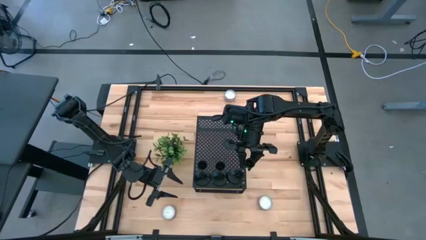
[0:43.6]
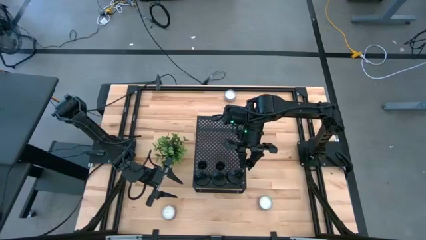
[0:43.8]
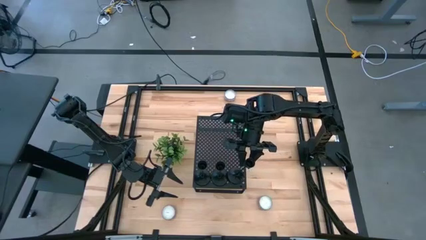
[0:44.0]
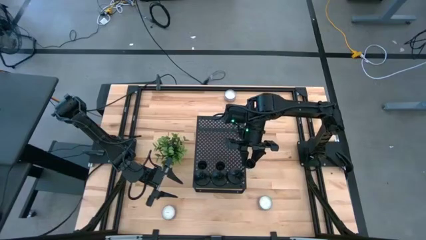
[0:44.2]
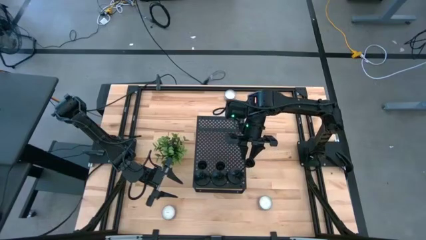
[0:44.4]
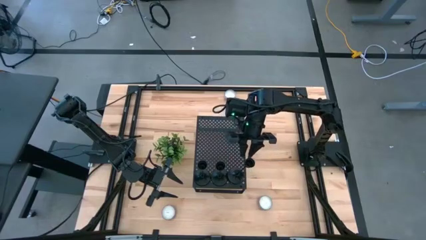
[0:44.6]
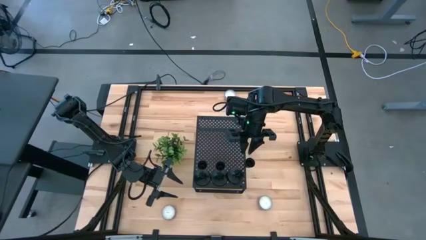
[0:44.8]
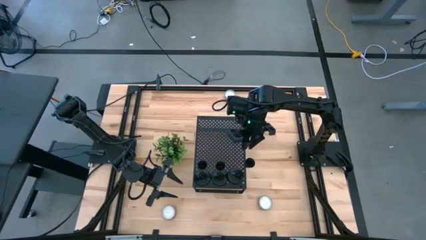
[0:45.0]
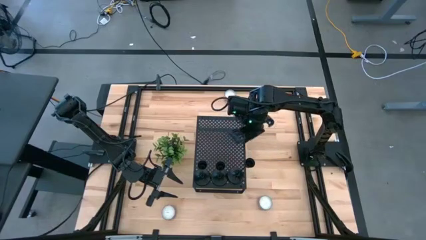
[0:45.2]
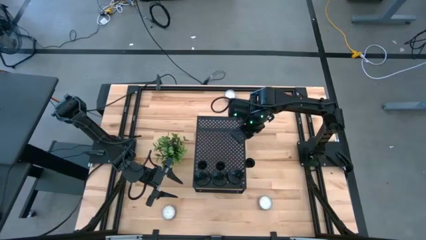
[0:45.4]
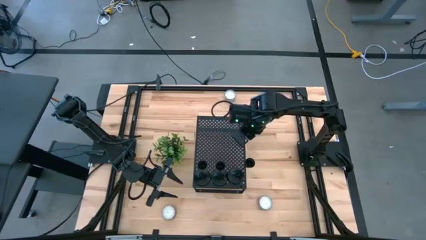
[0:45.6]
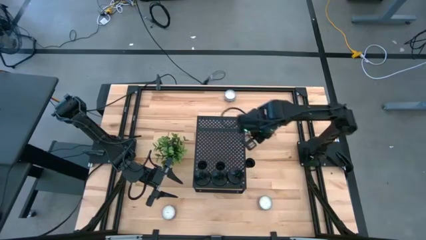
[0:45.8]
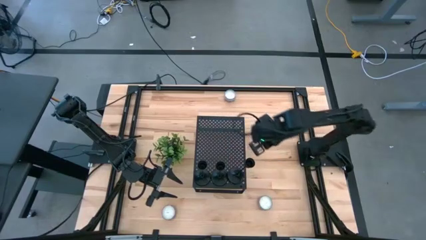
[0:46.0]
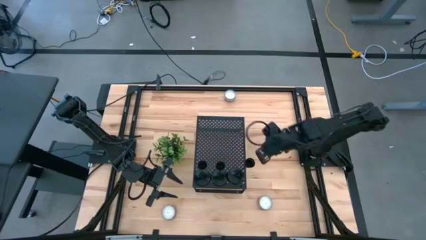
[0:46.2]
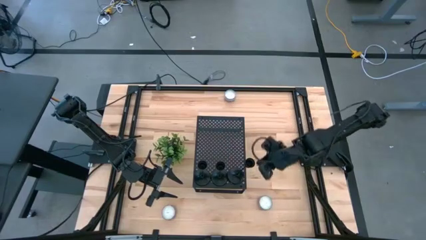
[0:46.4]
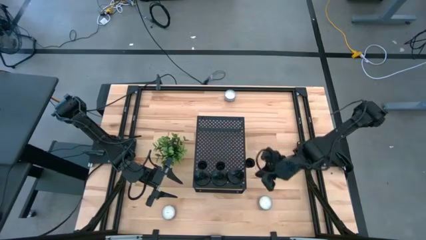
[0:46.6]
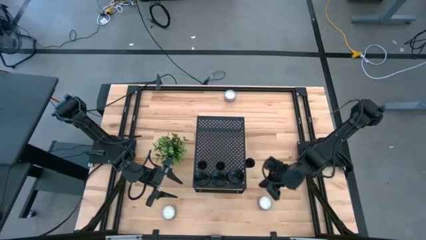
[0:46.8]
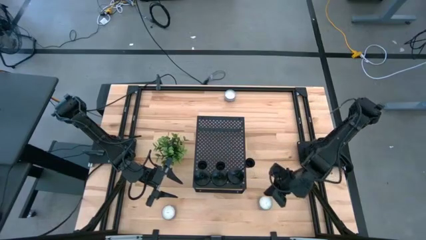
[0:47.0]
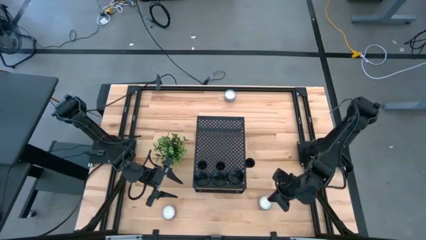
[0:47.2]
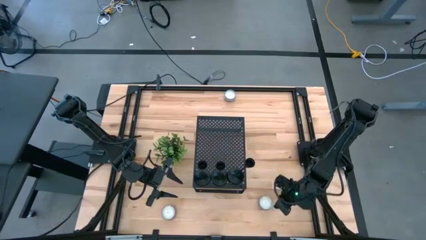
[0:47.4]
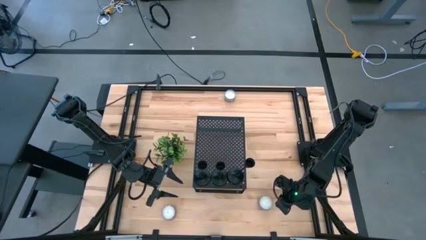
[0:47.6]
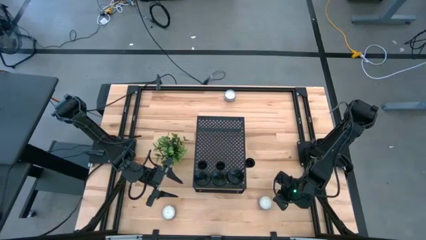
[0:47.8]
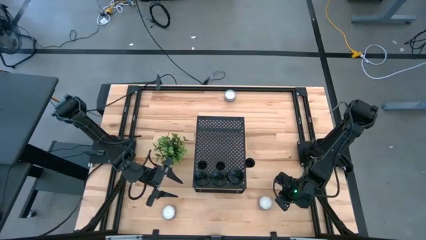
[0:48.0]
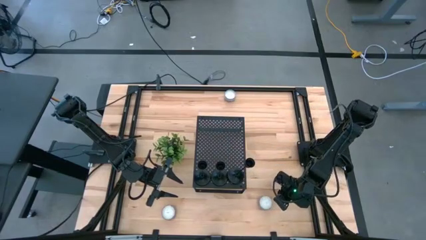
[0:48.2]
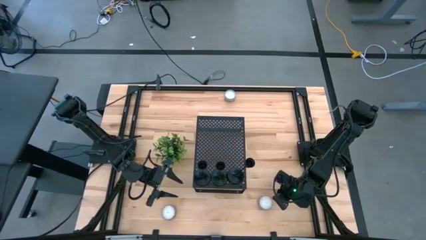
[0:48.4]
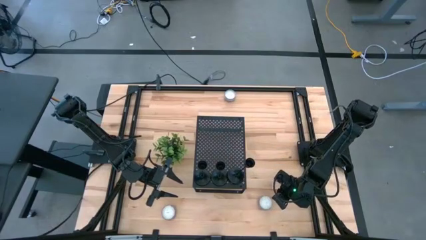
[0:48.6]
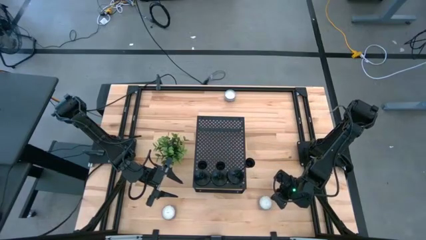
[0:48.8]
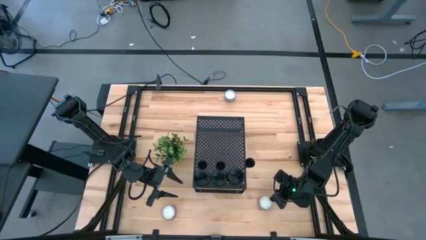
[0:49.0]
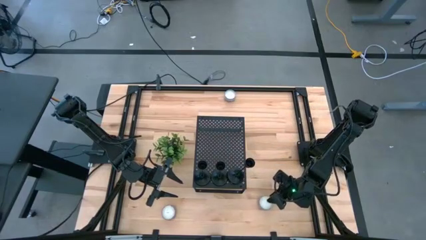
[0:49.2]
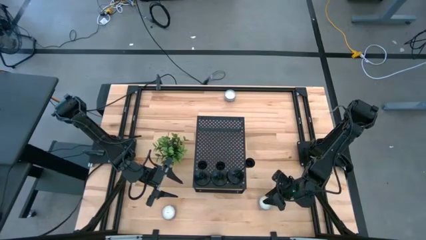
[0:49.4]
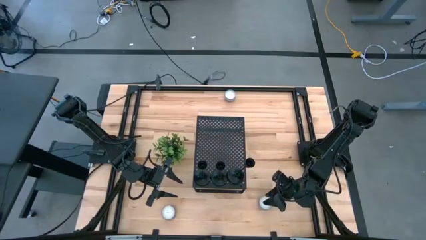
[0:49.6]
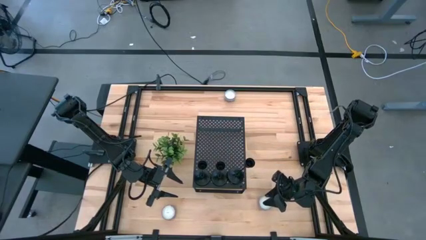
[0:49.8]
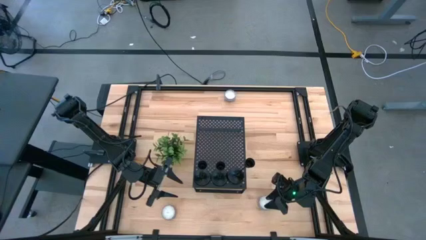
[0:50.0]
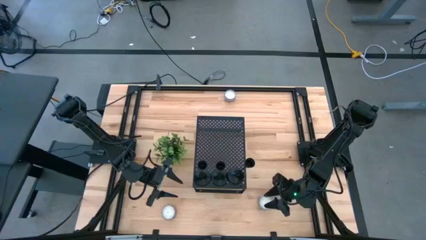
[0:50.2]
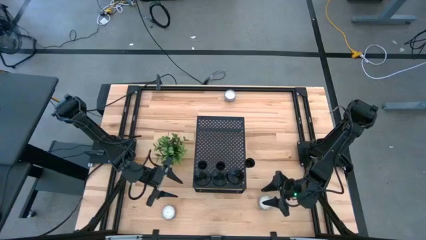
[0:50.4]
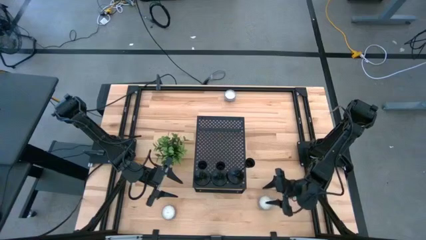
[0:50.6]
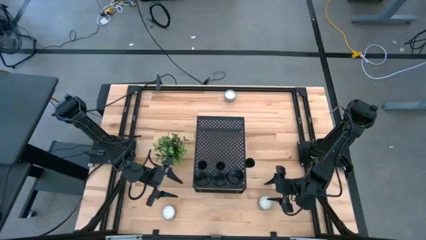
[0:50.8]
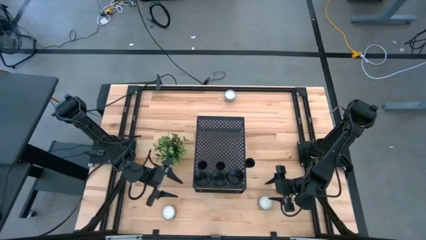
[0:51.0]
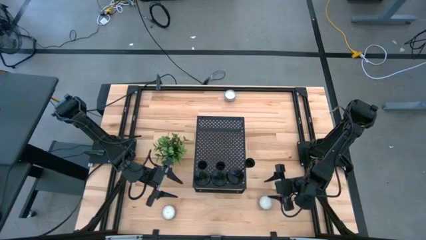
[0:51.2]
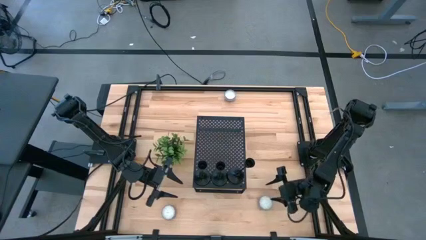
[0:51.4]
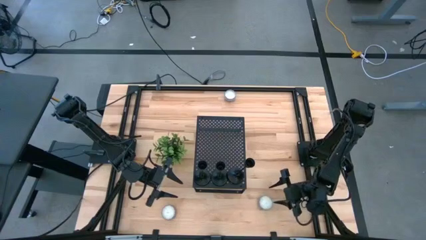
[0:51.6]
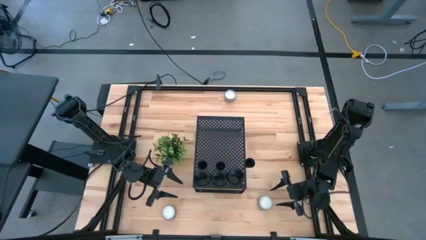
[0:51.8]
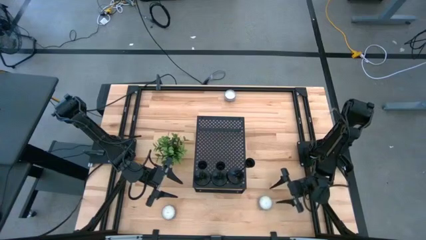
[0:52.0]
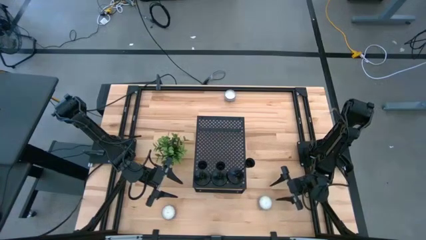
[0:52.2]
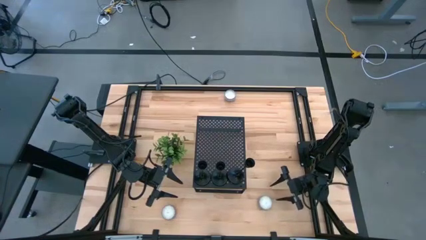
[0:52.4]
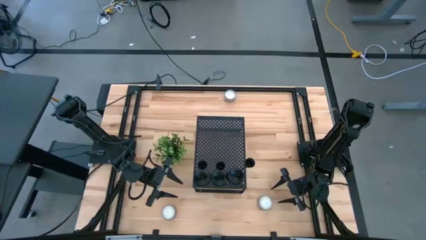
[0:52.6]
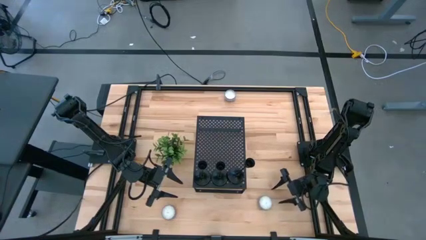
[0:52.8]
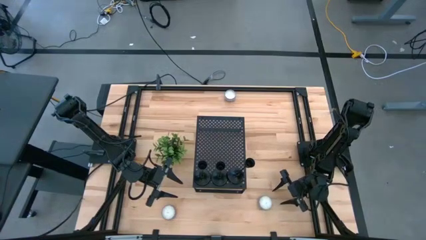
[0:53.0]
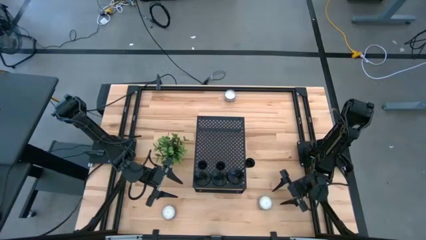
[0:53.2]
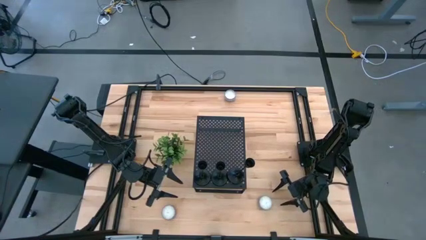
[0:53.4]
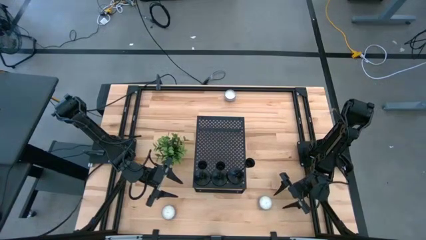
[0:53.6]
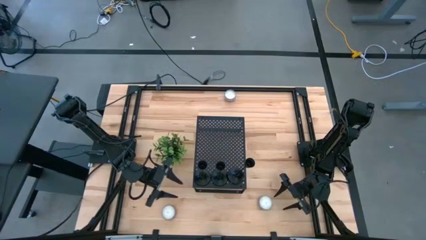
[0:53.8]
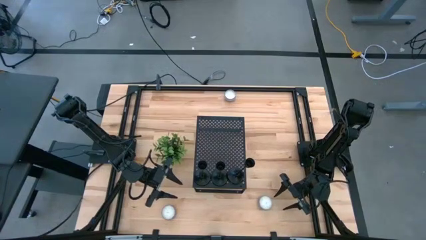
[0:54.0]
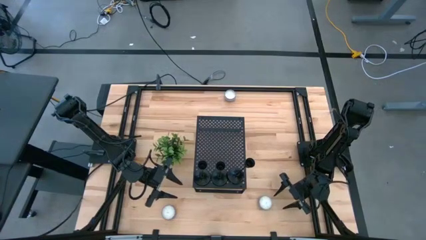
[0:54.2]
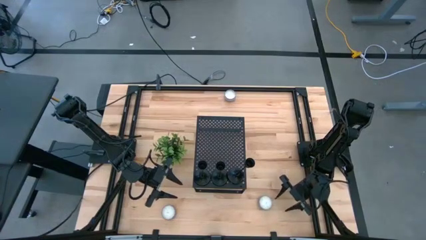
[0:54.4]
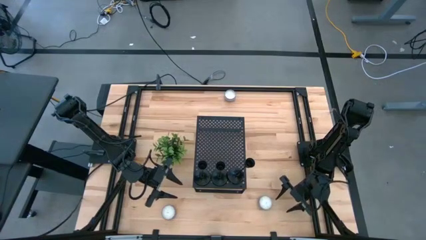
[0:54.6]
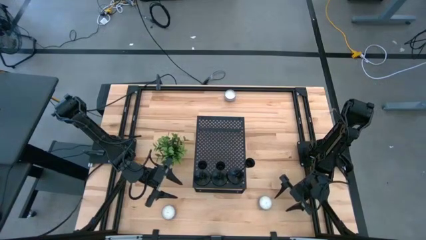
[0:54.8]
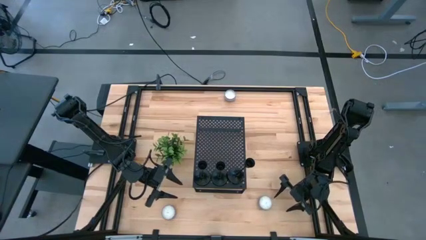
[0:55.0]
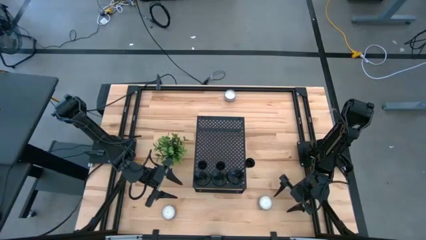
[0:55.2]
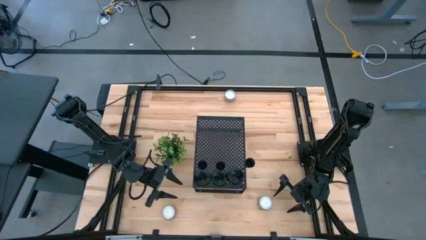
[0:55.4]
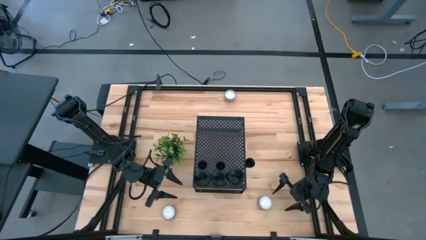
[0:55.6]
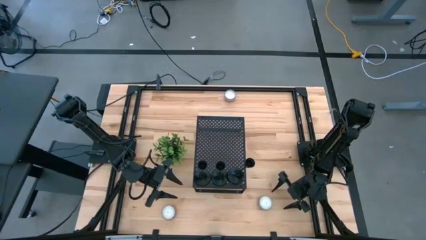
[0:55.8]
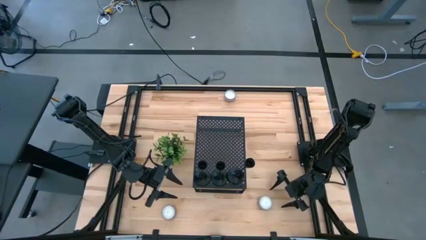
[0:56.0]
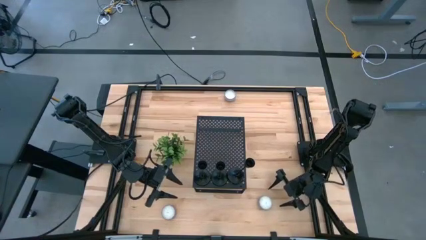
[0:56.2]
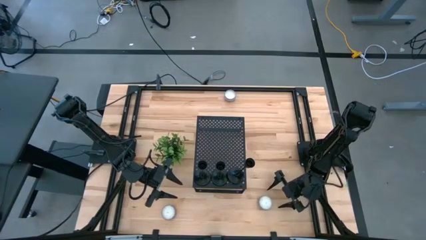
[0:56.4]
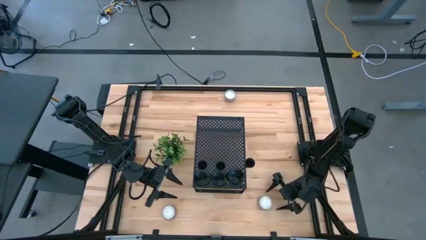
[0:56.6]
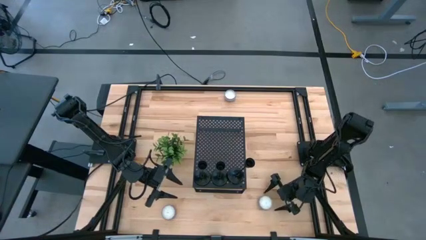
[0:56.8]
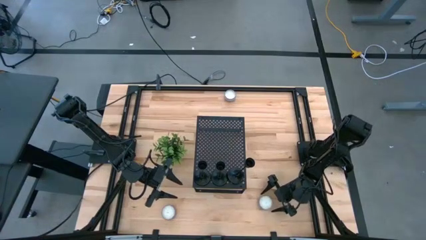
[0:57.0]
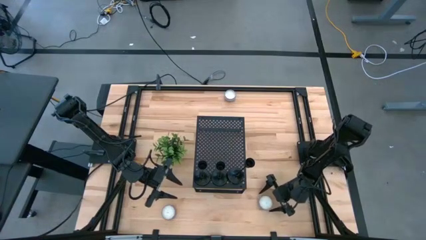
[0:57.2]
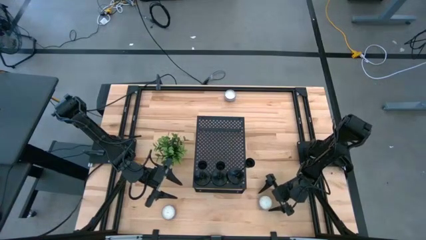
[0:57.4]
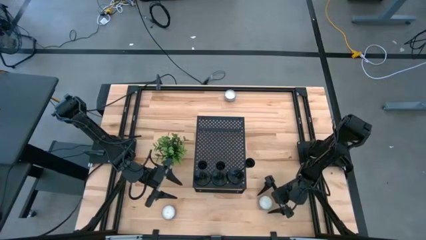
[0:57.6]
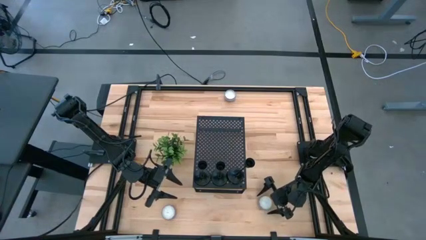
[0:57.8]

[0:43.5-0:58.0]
Task: Pick & Place candle stick holders
Put the blue patterned candle on the shelf

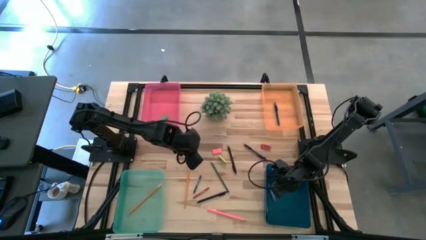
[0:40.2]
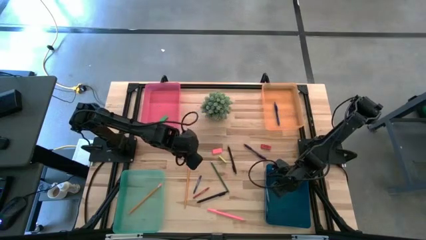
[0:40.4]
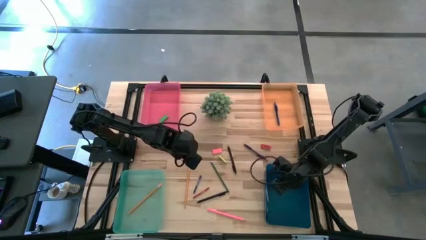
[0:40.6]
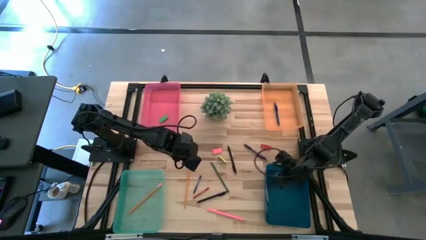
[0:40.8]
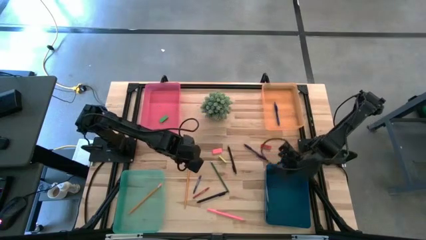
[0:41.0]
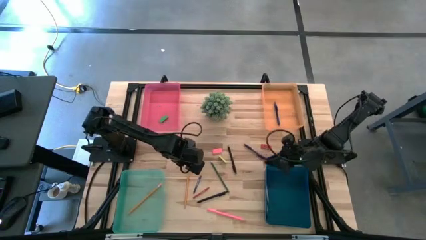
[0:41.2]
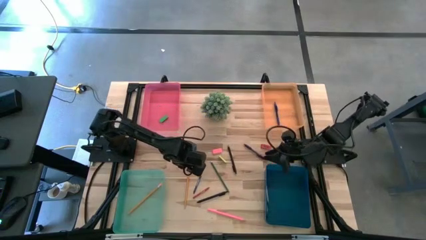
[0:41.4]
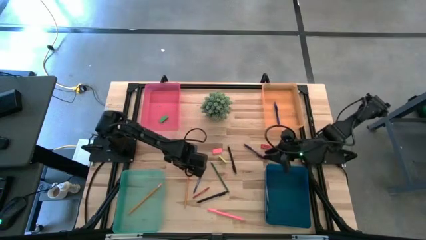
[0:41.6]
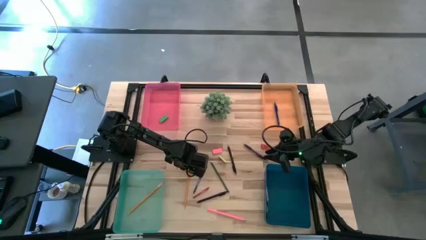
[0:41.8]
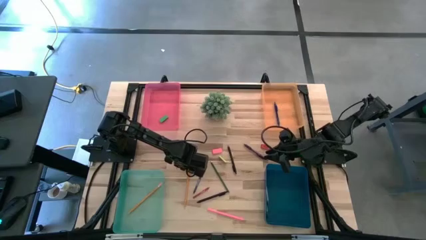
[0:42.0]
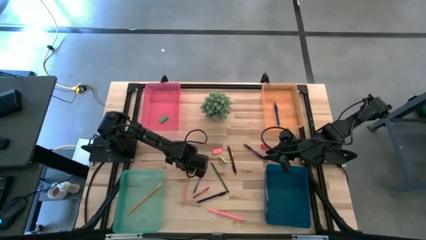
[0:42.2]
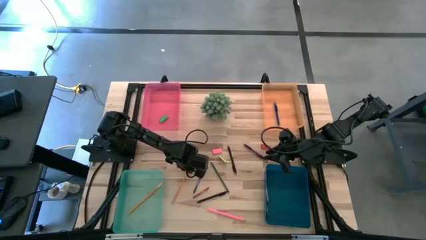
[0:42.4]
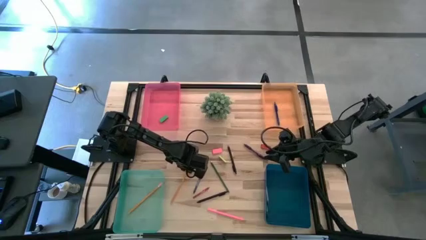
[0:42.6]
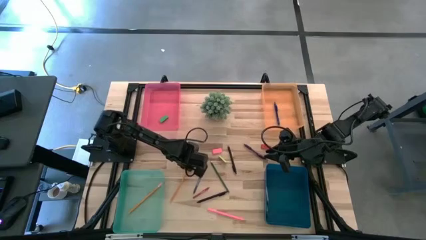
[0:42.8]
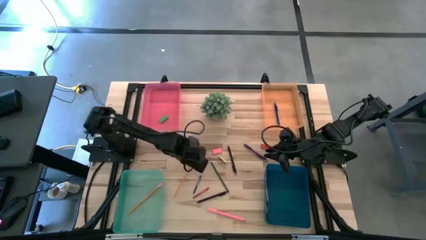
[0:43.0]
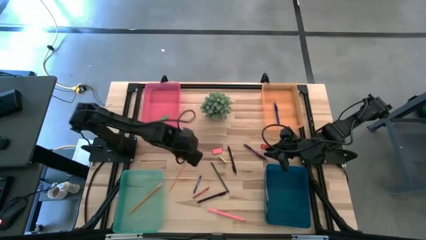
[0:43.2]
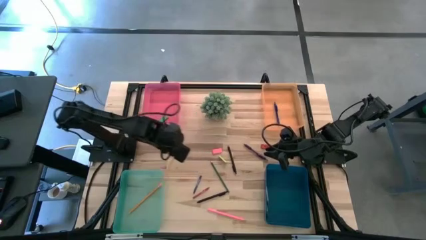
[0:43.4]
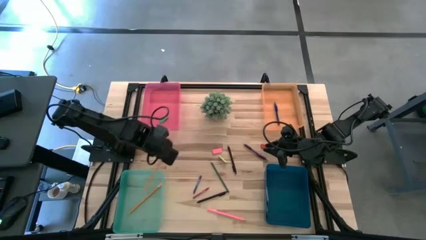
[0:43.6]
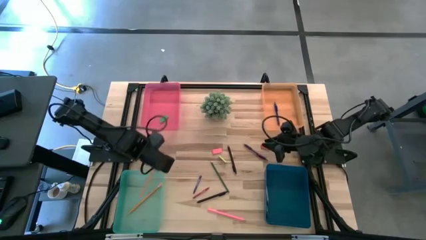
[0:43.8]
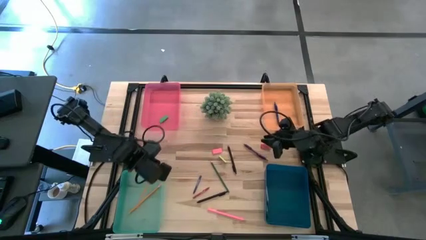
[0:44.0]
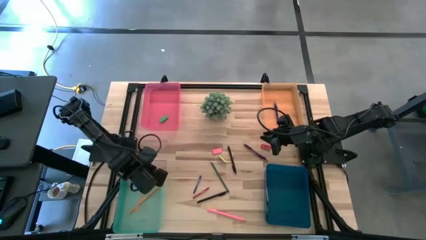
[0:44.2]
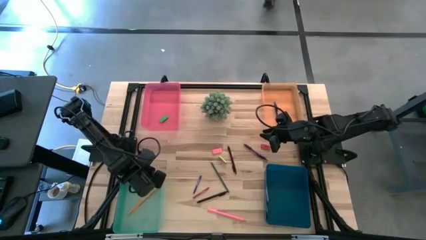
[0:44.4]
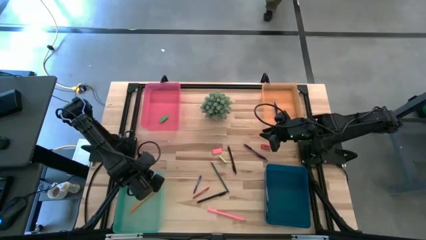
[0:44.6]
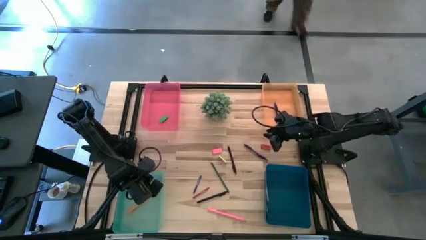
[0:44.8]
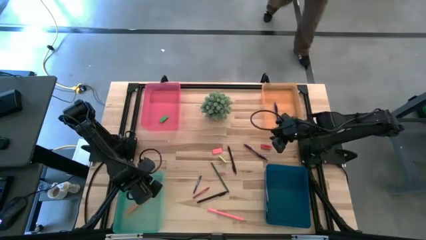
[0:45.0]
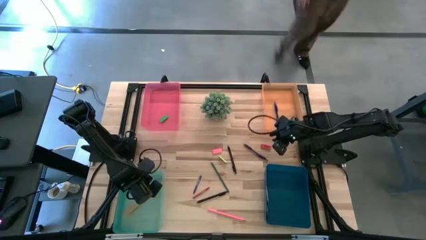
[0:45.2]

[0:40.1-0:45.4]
Task: Sort crayons/erasers/pens/pencils in bins
Put the yellow pencil into the green bin
